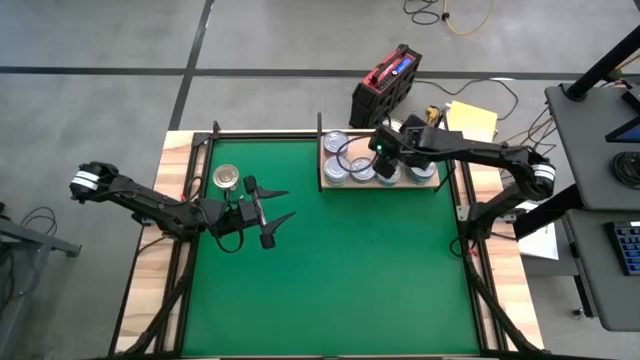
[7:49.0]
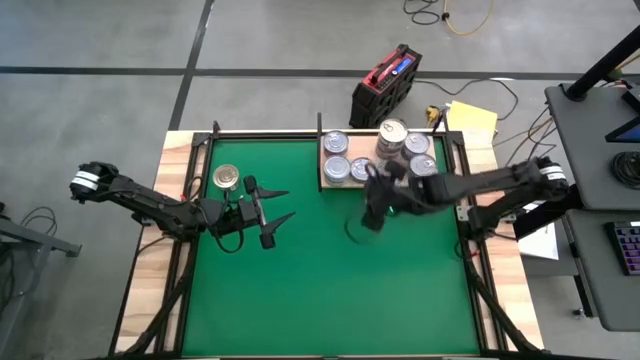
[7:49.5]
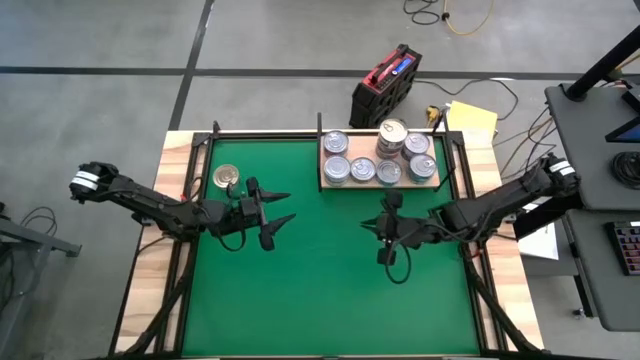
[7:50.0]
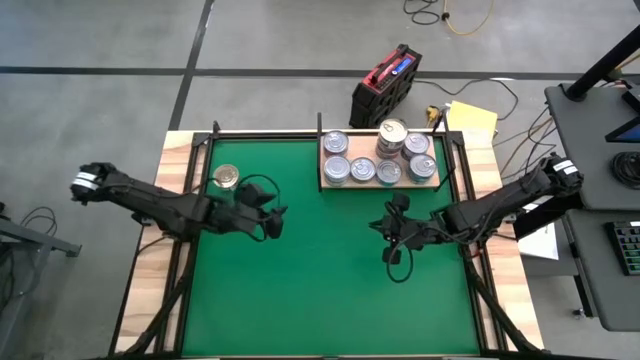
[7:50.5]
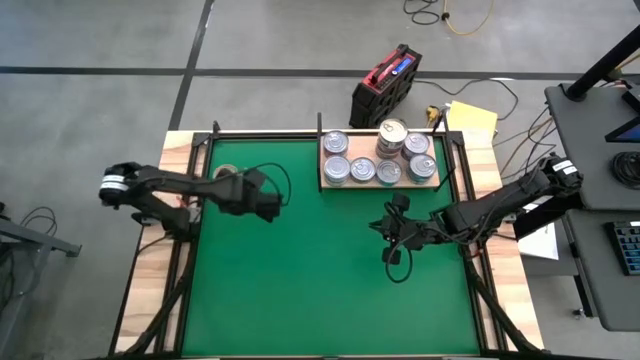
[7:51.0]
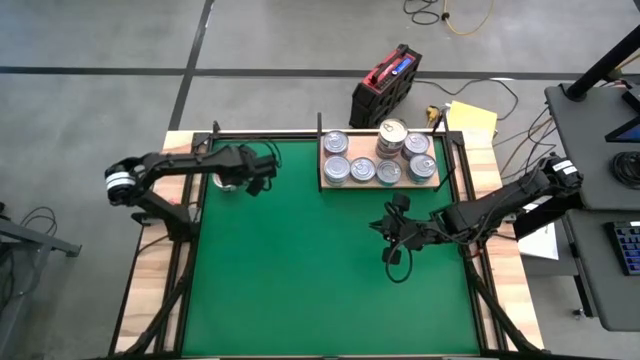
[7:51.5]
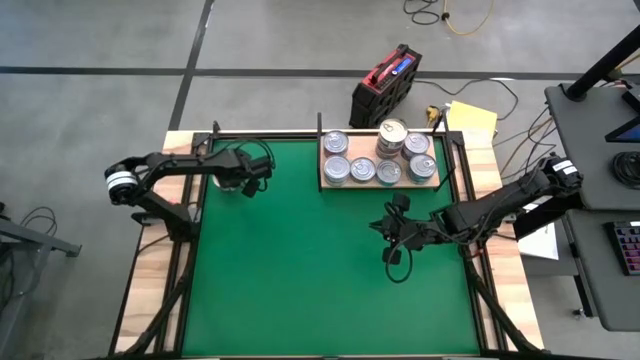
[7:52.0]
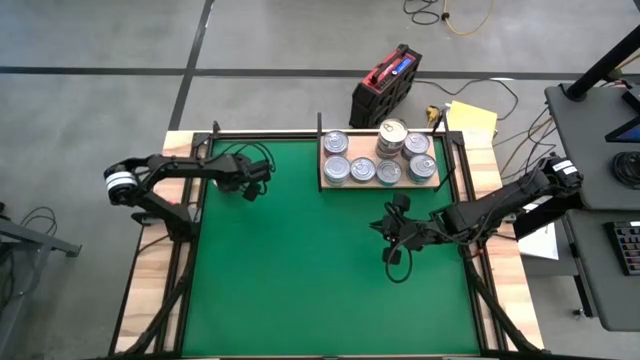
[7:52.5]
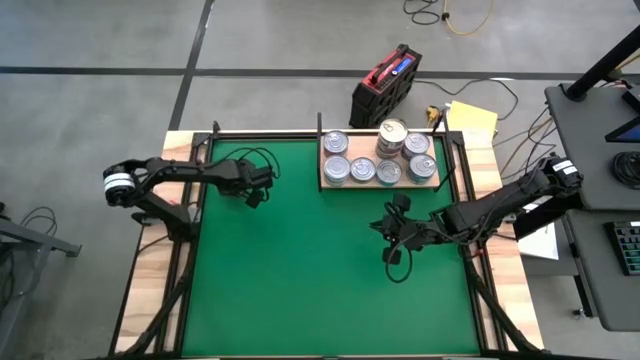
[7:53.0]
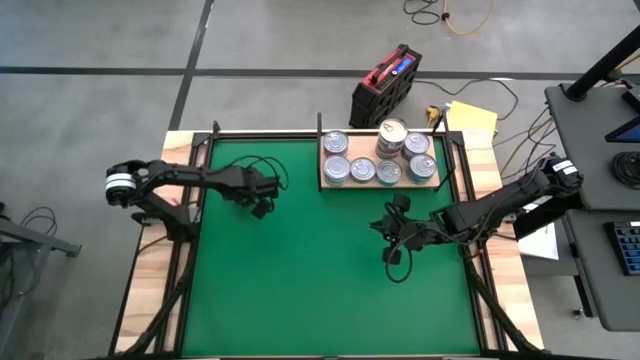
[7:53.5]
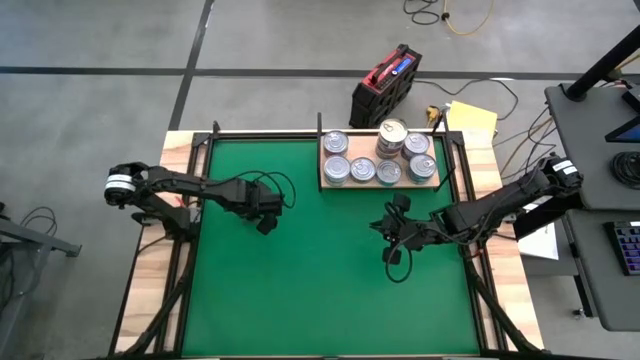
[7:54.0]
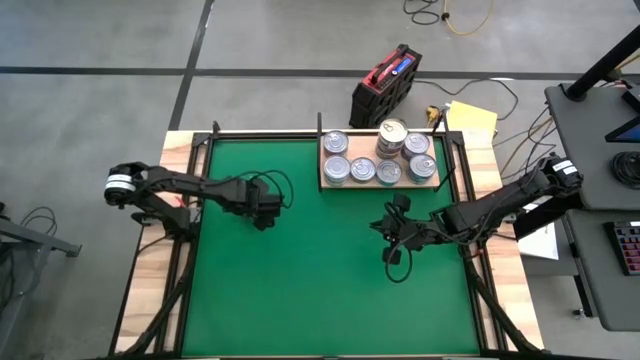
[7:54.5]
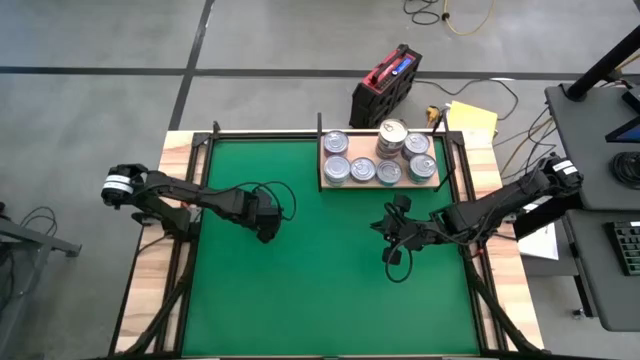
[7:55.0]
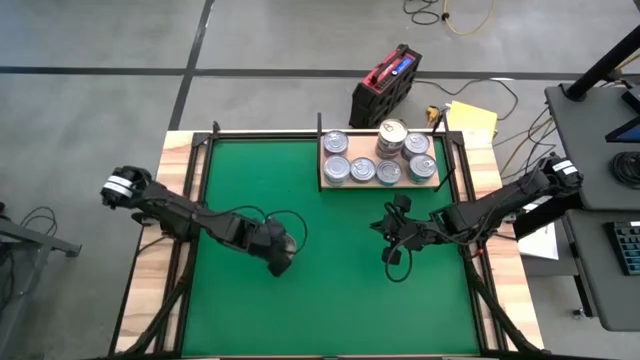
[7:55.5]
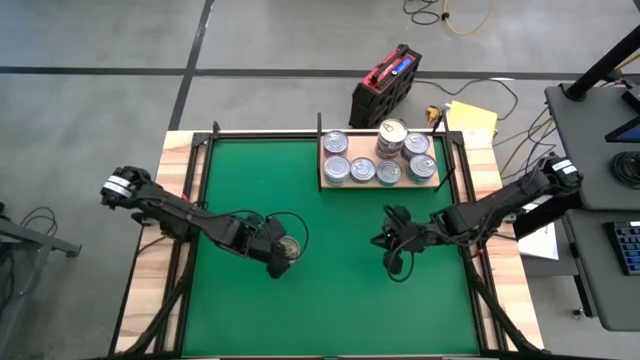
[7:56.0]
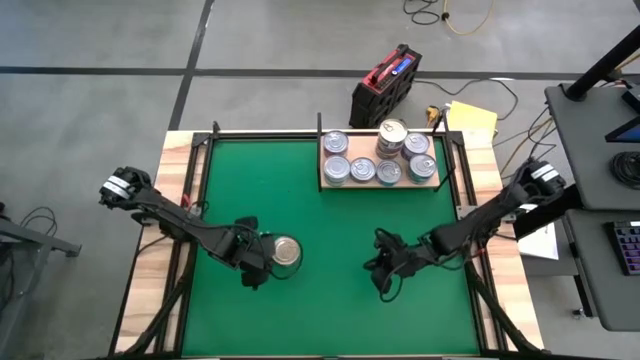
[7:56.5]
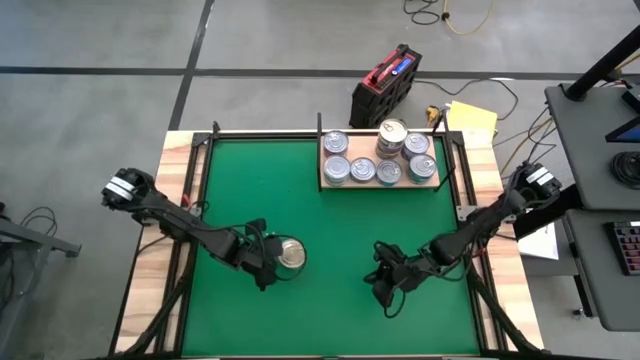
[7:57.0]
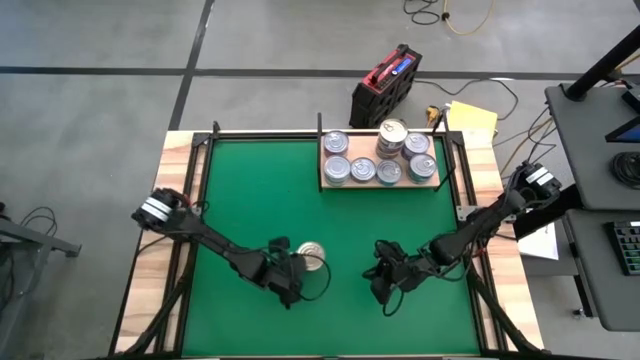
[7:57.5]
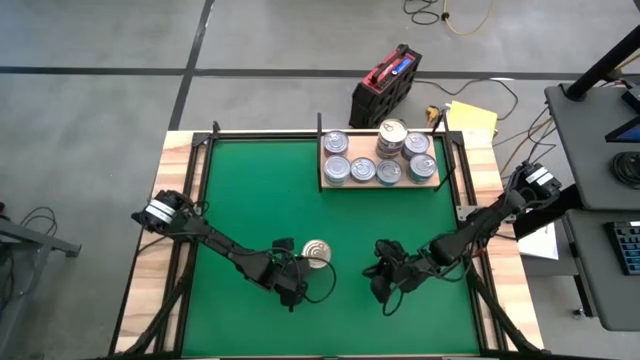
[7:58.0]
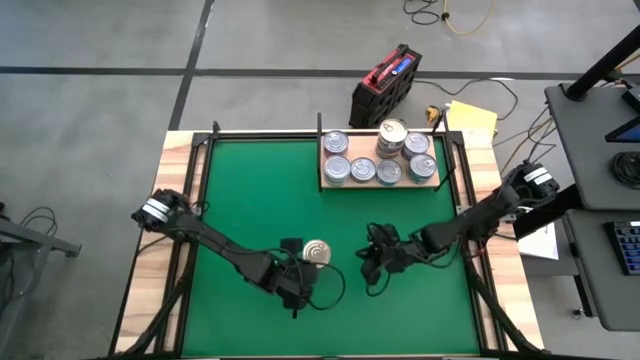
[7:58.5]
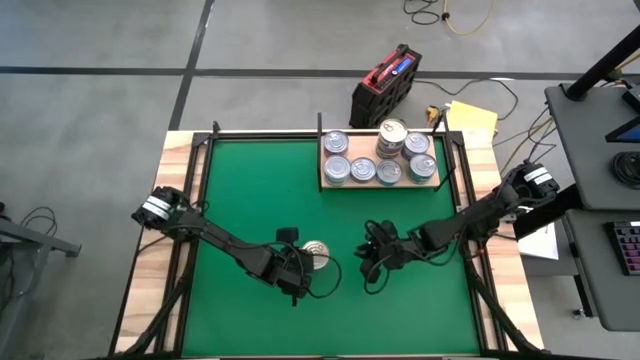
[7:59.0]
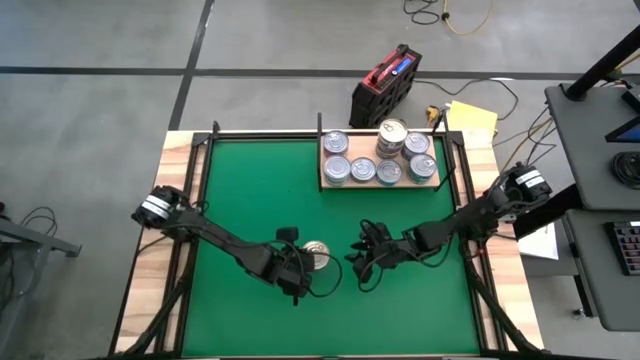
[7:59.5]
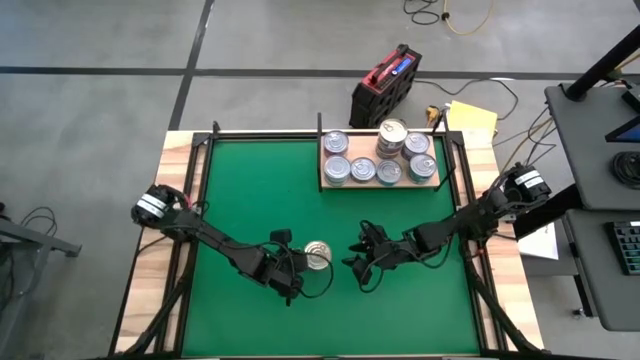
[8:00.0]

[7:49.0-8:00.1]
Task: Stack canned seafood by type on shelf
Stack the blue/pink tuna can on top of the blue/pink tuna can on the shelf

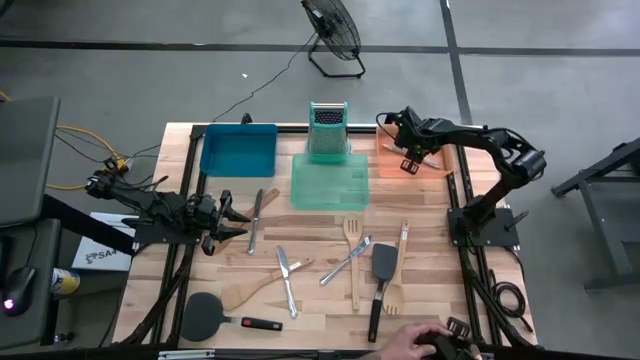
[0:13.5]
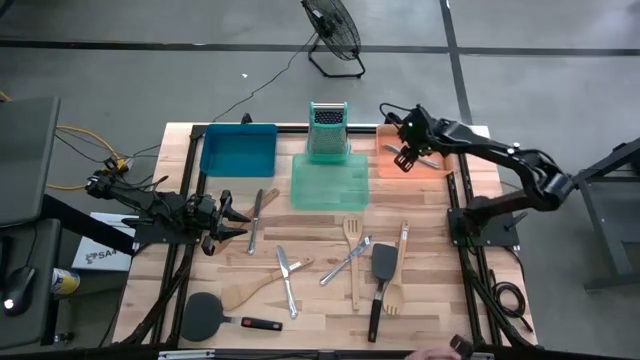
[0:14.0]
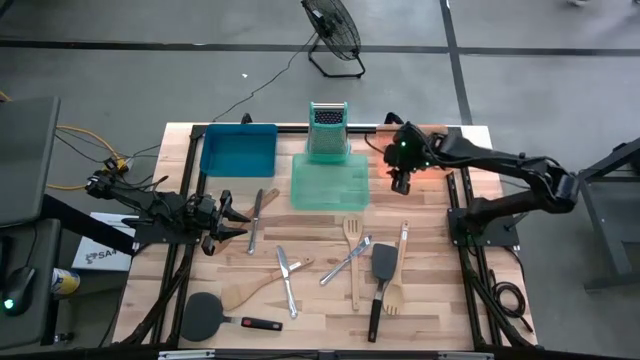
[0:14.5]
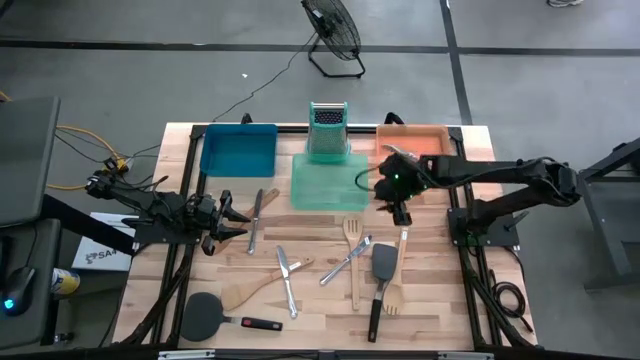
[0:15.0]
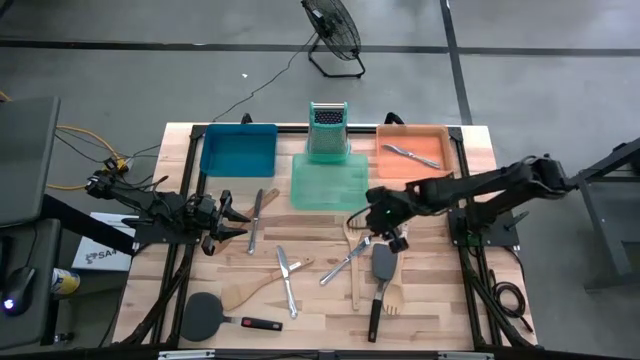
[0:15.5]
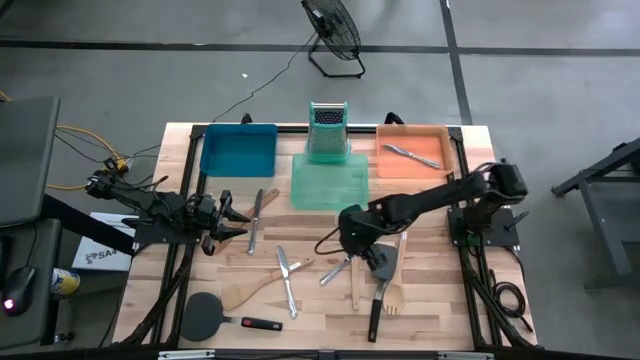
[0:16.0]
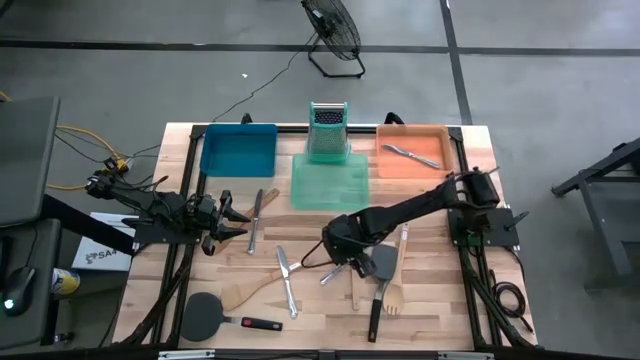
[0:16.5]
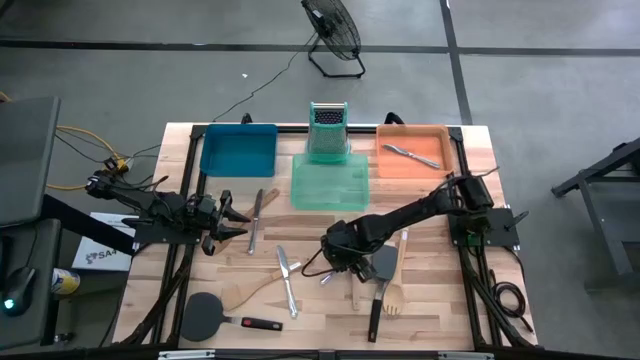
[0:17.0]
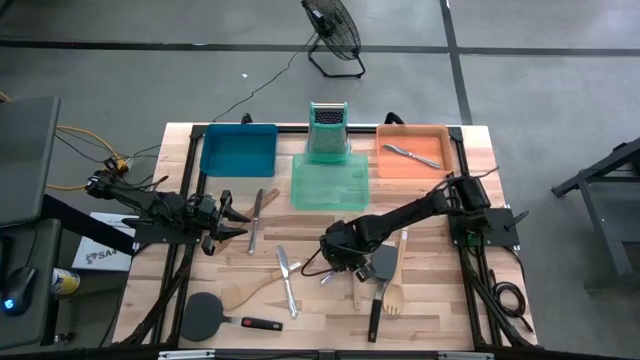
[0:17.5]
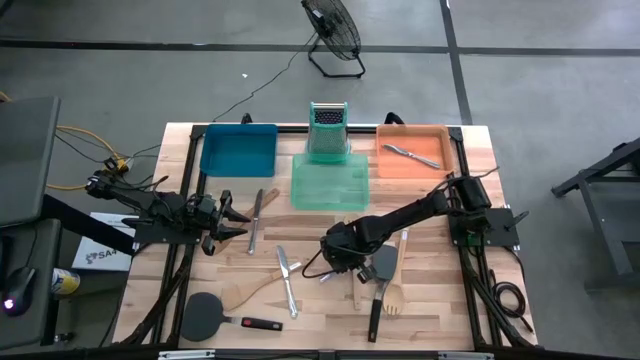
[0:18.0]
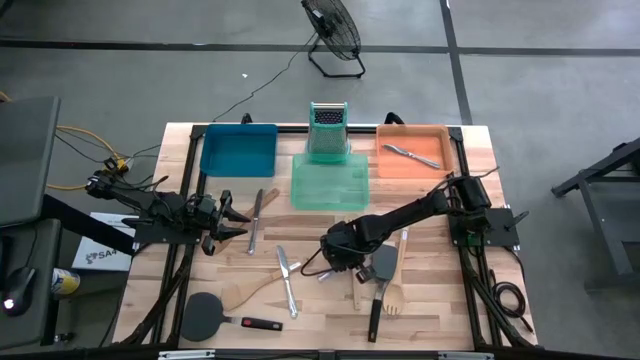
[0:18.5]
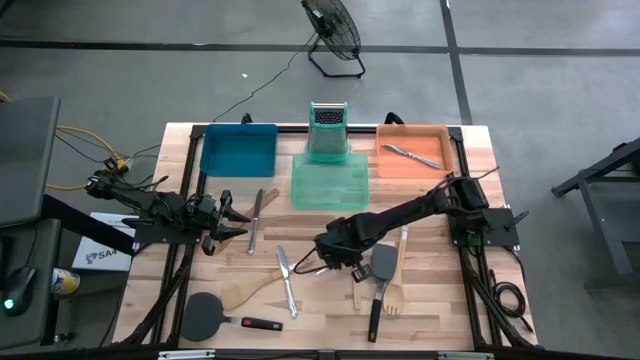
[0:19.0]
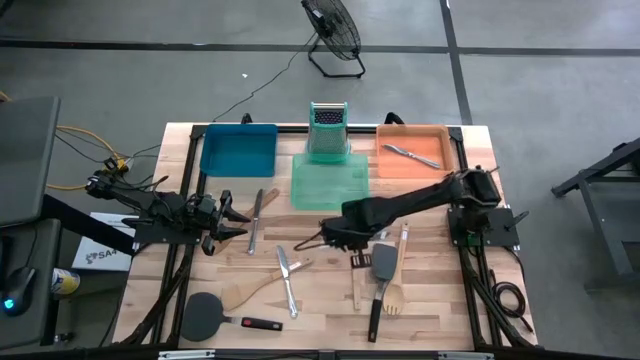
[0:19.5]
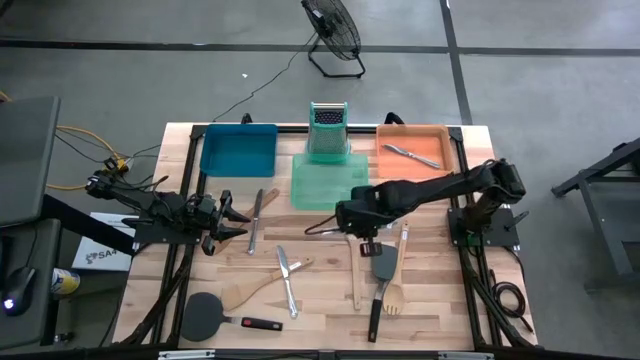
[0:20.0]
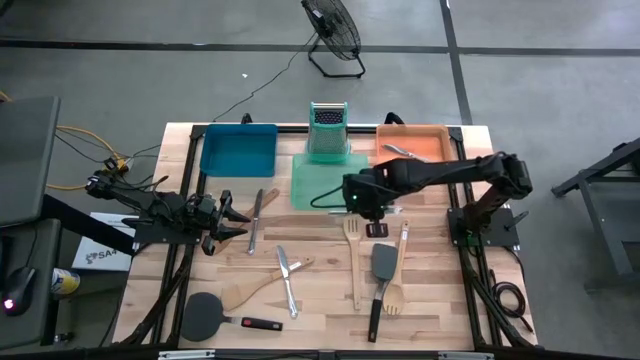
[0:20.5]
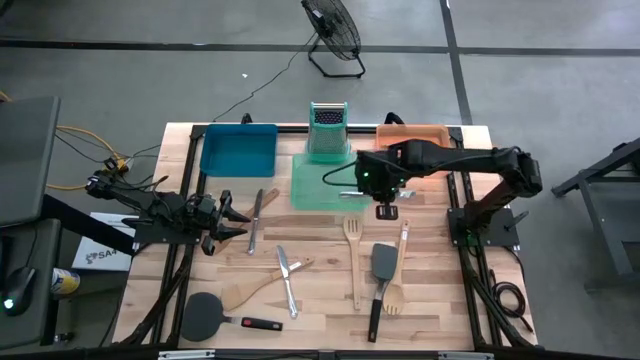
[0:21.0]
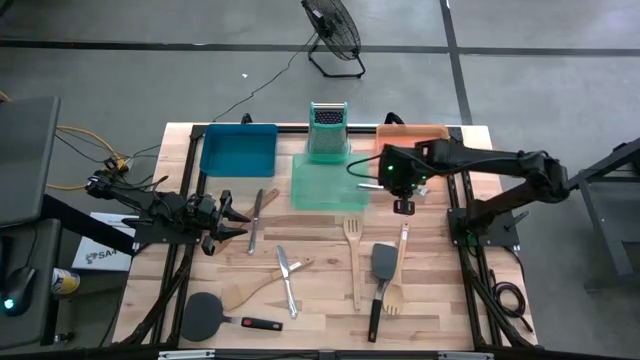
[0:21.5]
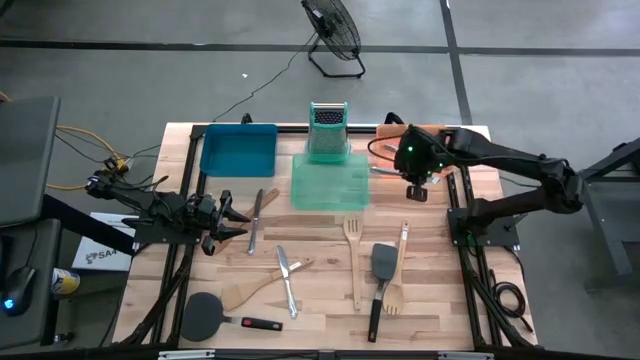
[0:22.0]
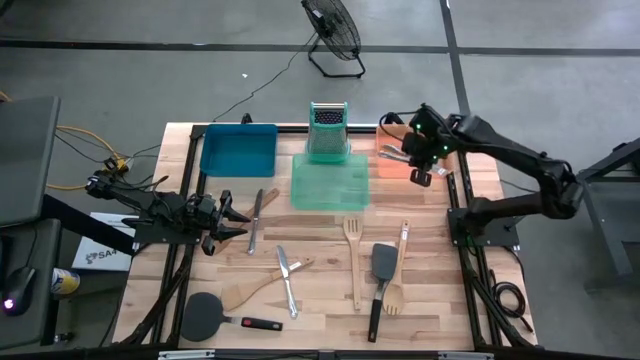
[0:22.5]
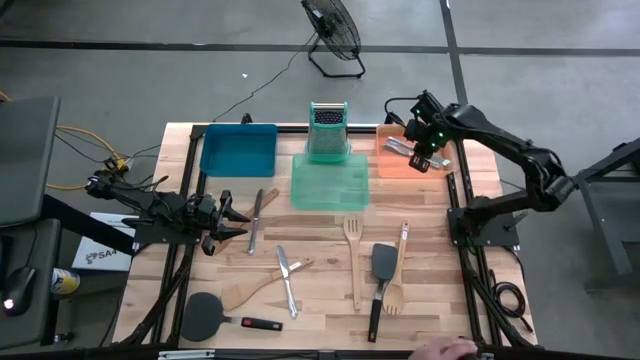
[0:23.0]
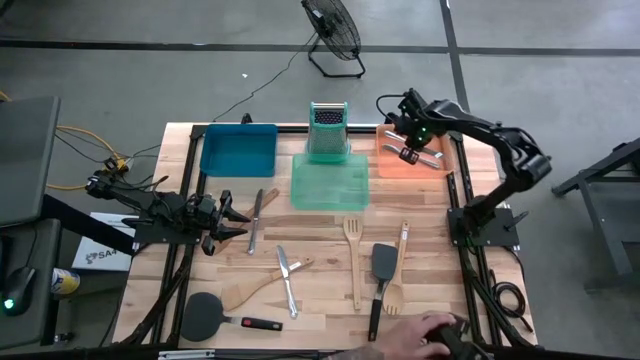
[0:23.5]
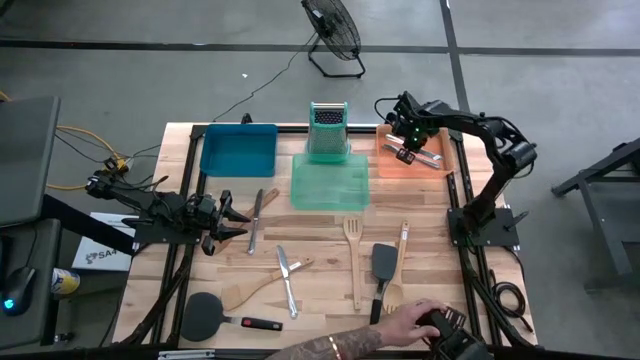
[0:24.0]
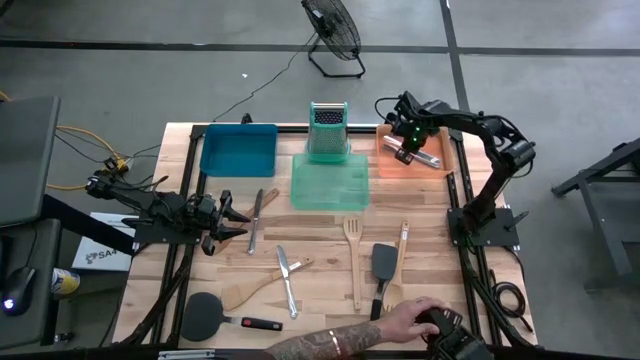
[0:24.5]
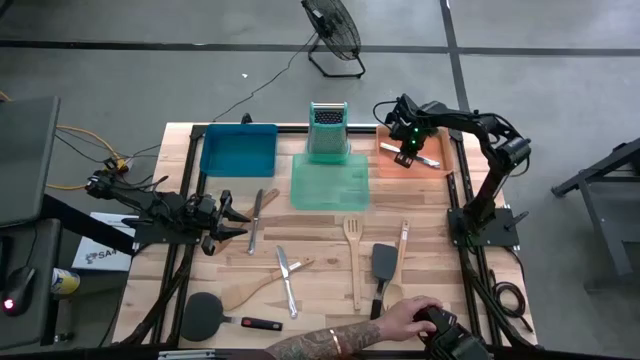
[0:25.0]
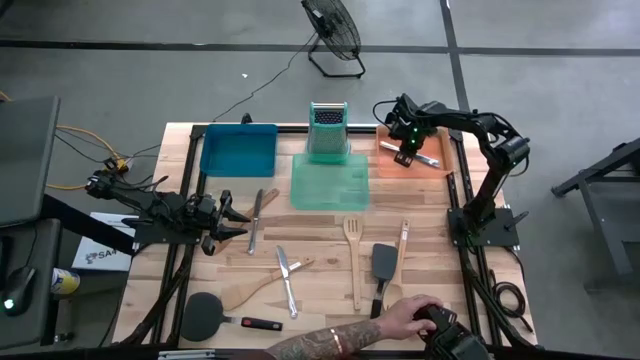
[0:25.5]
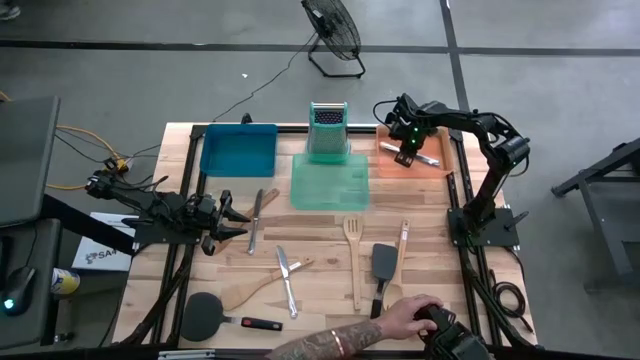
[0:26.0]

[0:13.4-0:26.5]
Task: Pick & Place Kitchen Items
Put the silver knife into the orange bin
